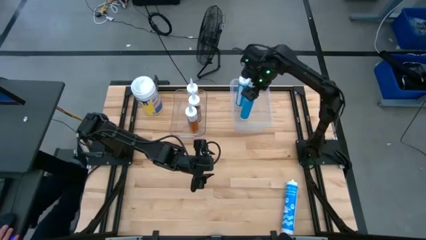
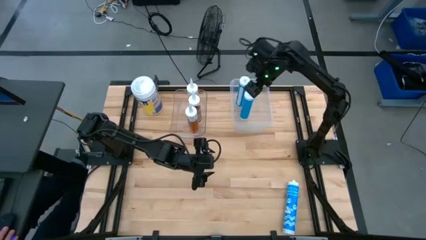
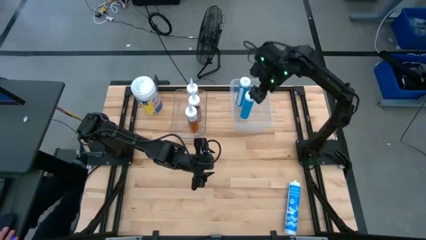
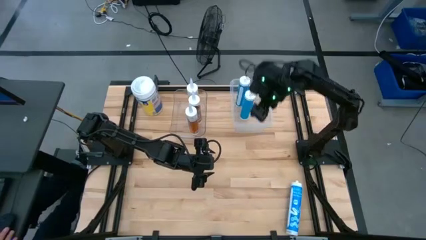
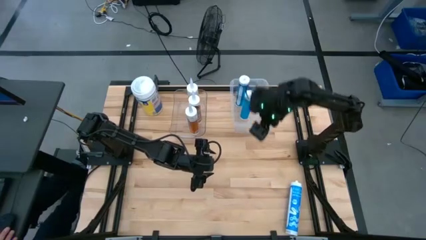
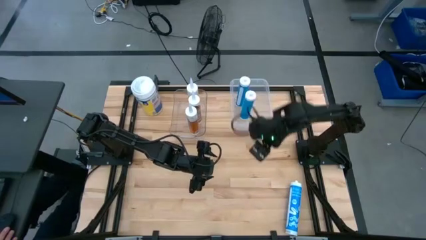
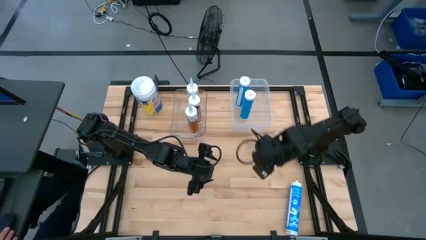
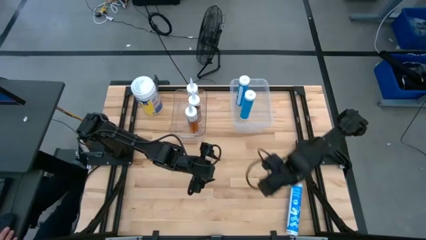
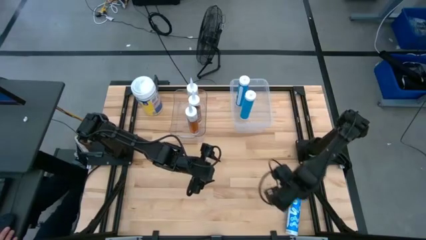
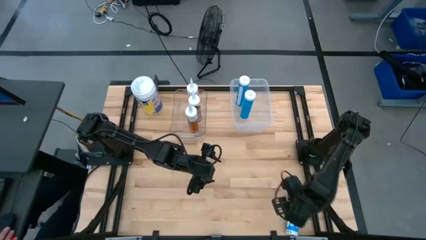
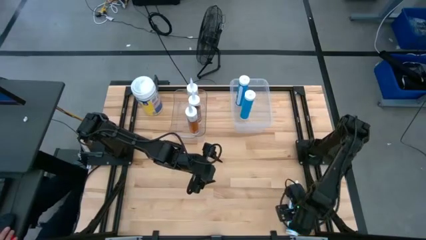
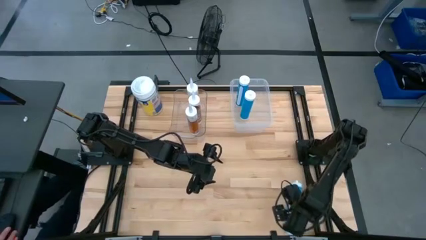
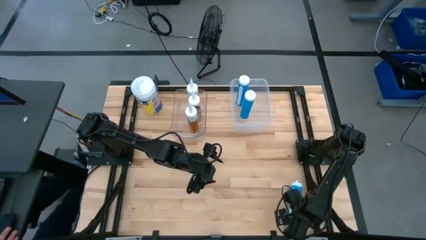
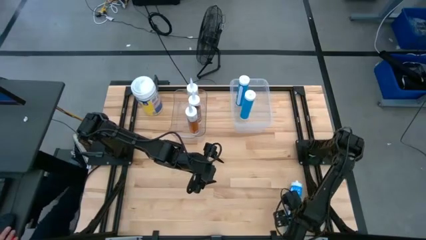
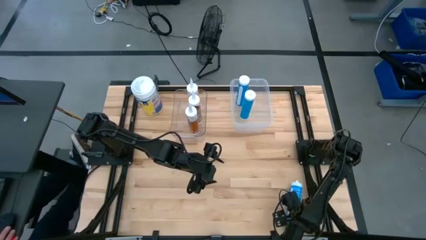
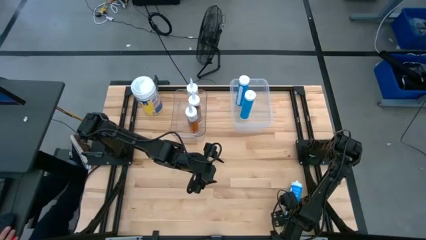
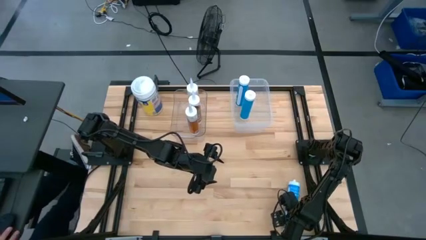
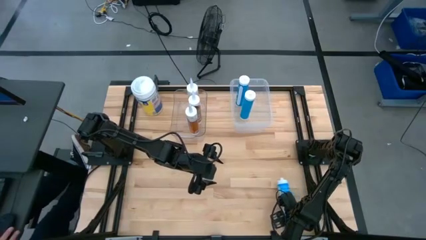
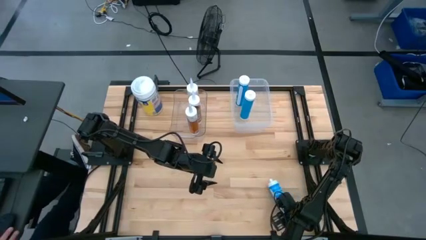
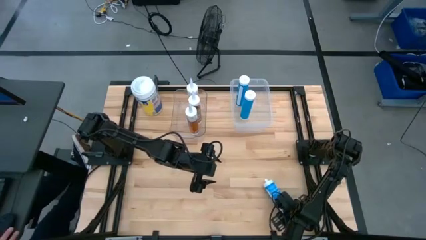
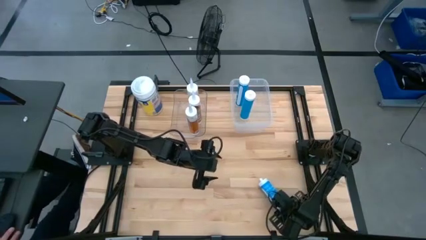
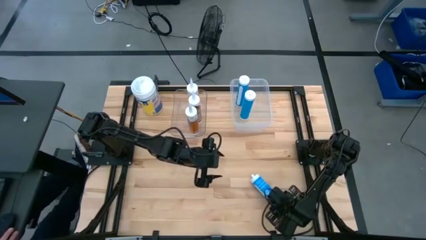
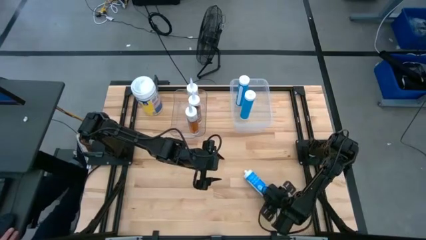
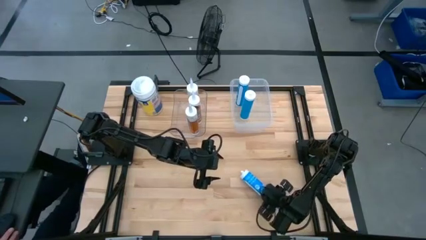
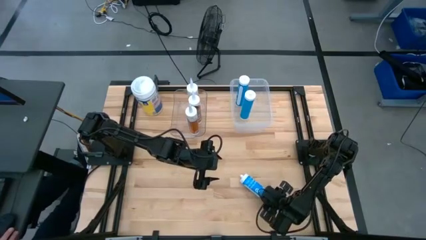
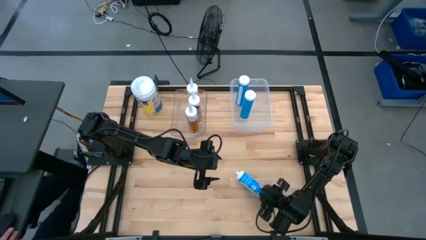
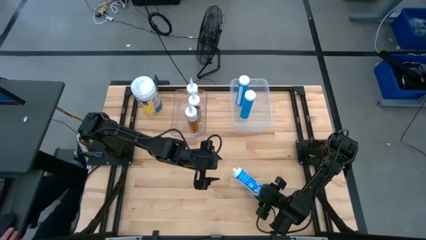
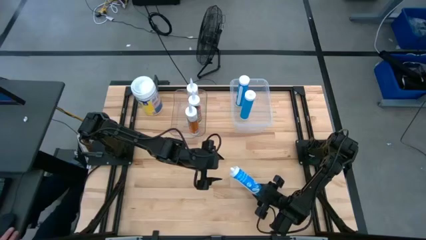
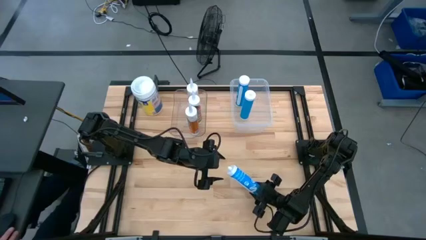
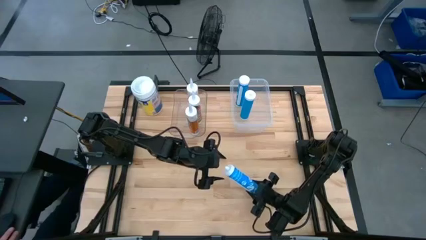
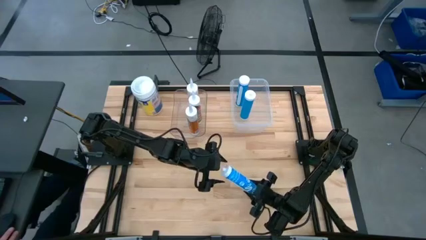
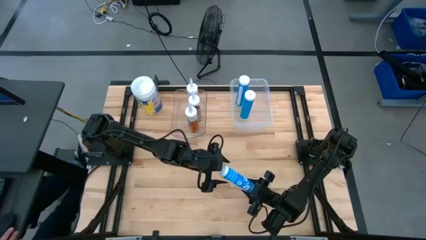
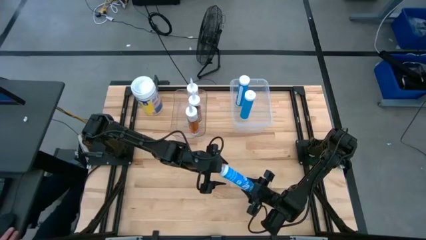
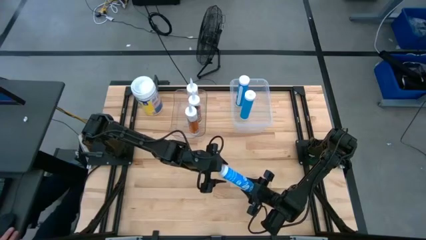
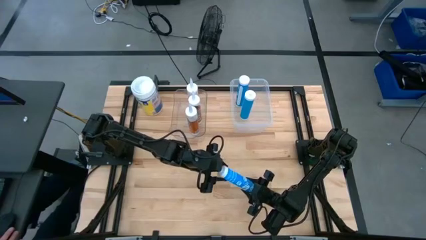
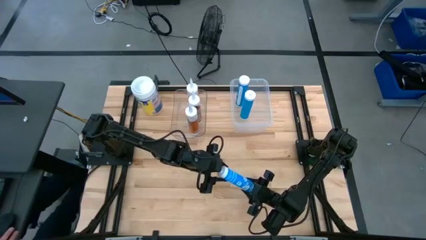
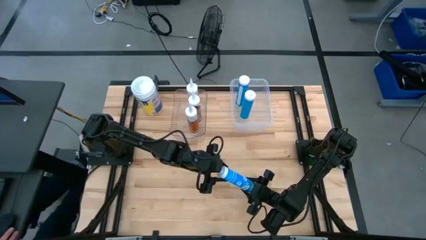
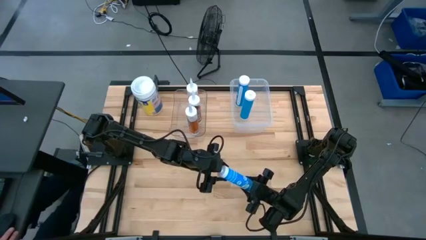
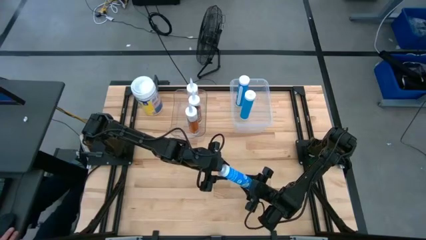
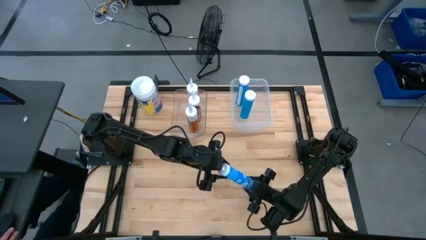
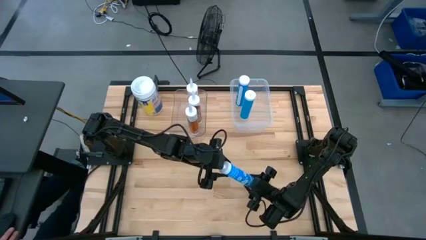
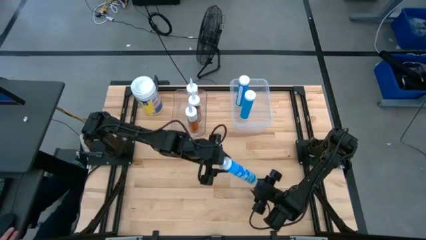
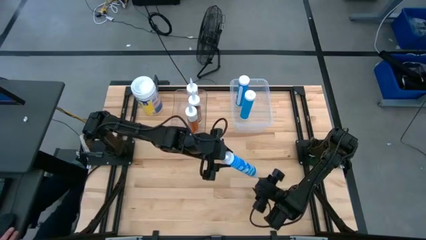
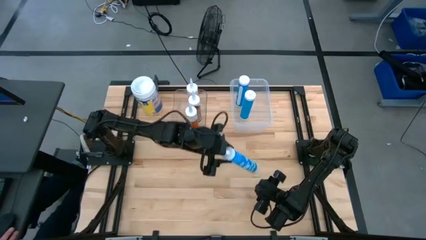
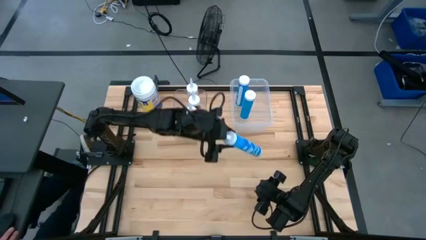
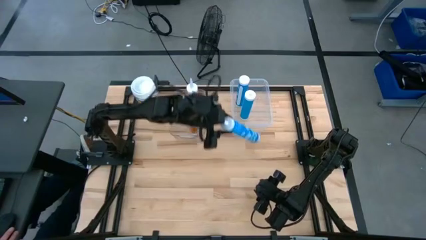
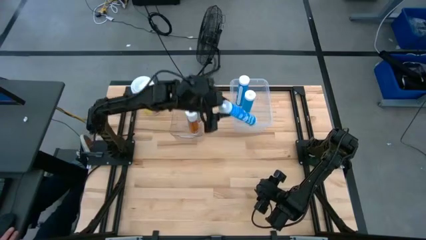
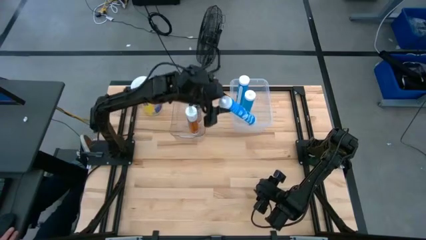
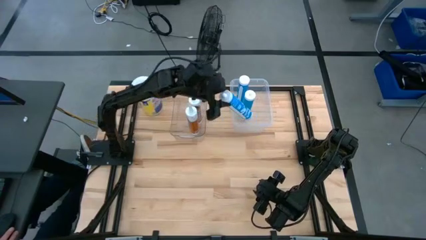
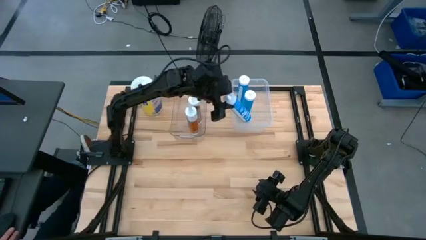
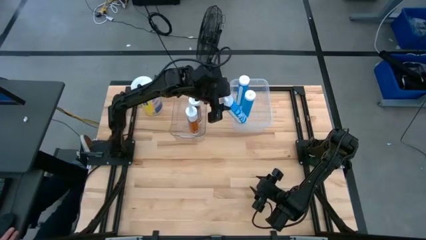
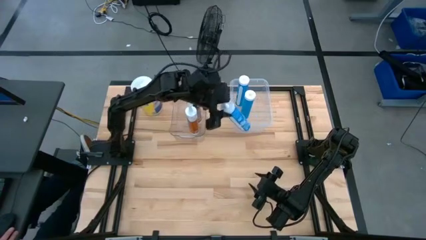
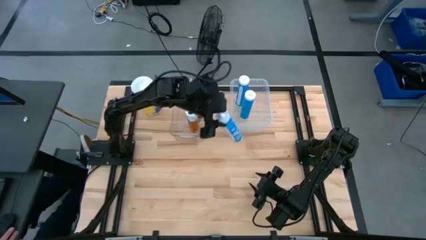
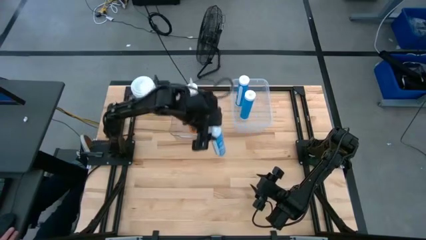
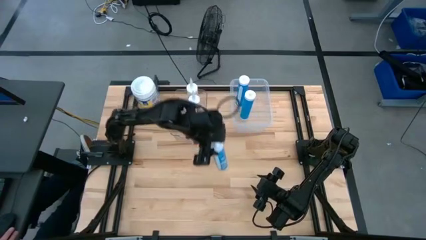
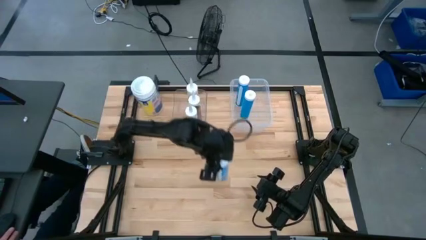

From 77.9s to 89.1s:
Task: Pick & place silicon tubes, Sealant and Lysol wipes
Put the blue sealant into the right transparent bin

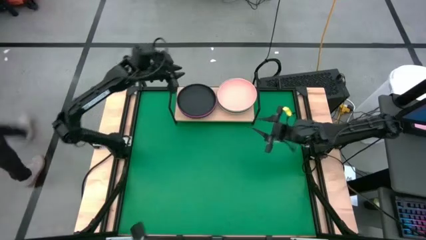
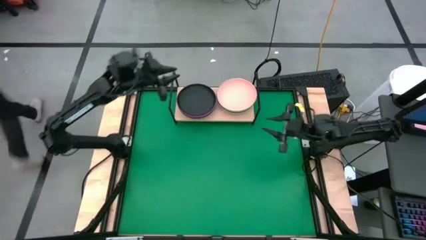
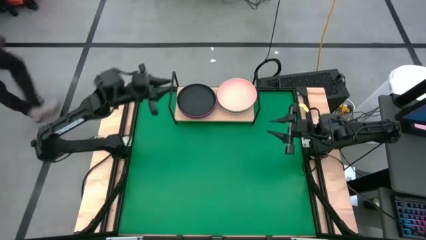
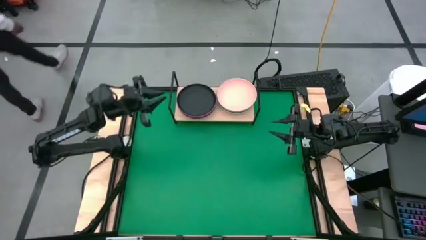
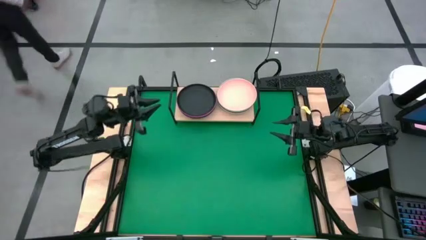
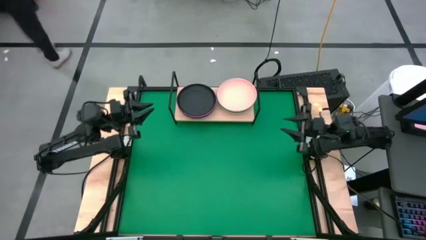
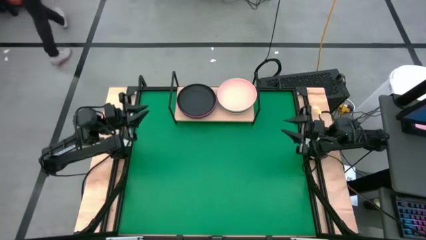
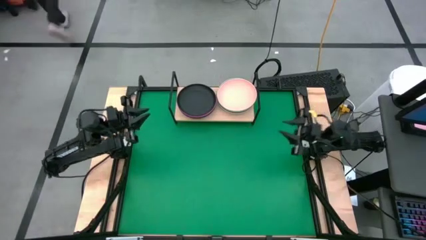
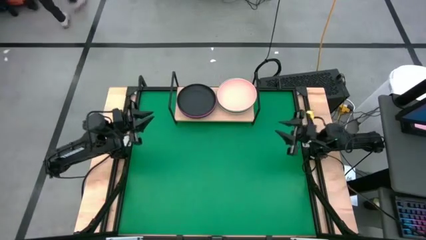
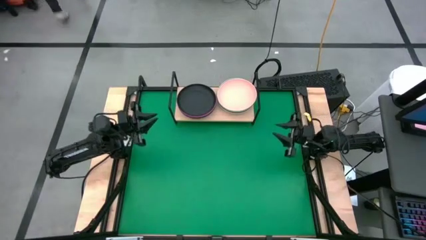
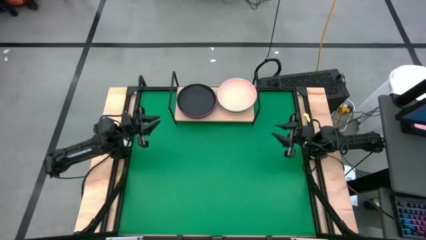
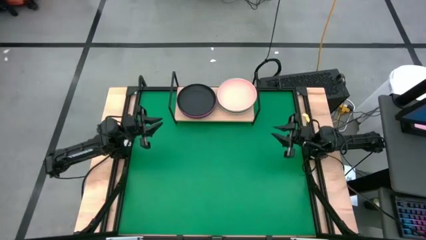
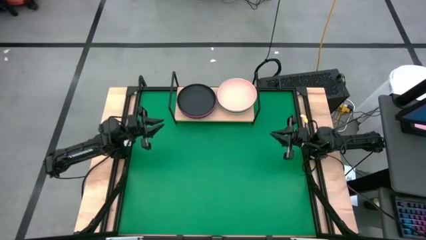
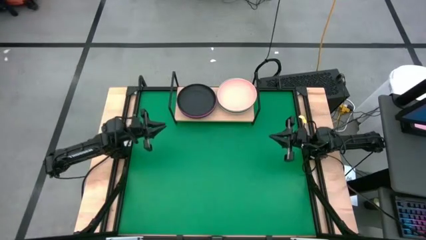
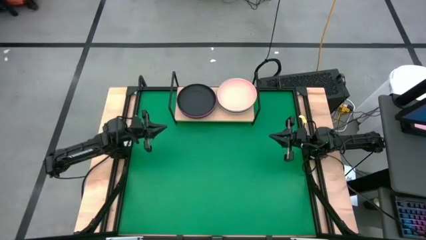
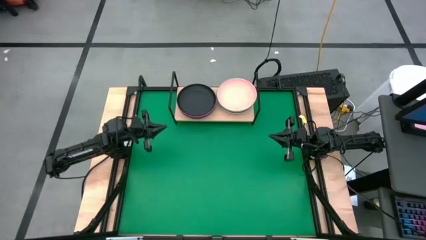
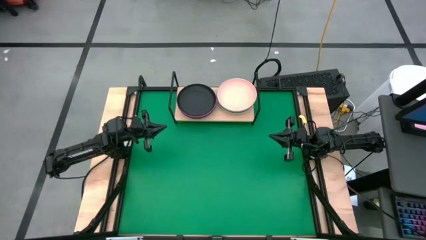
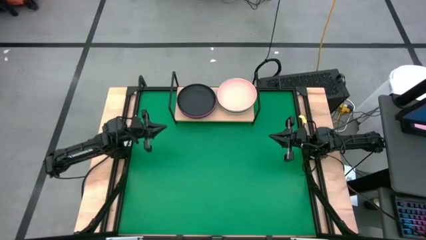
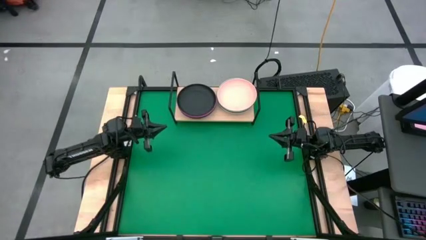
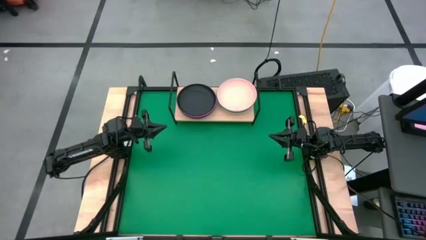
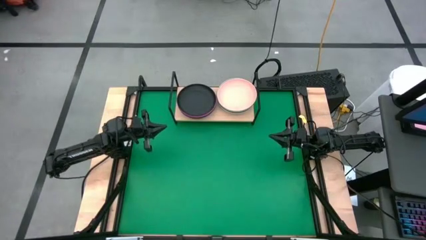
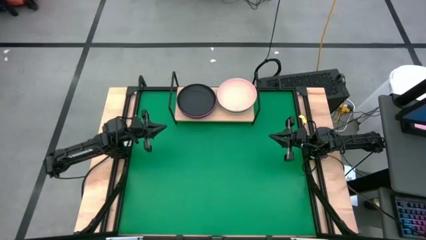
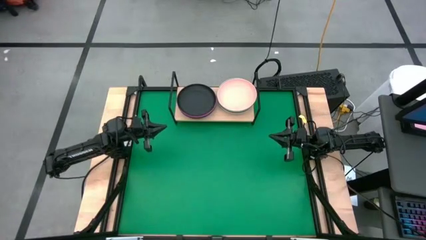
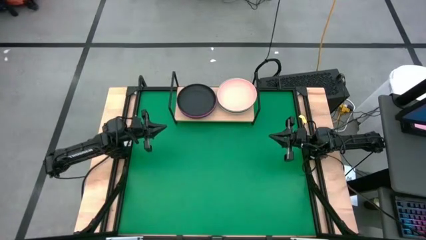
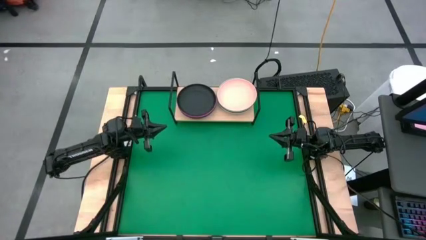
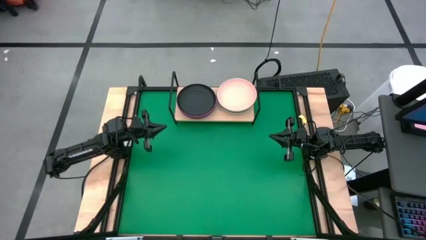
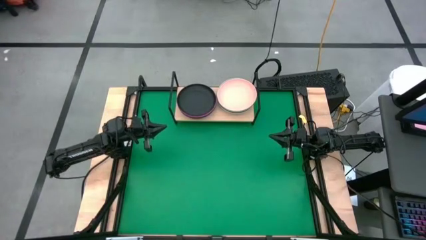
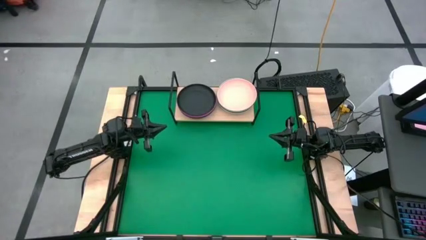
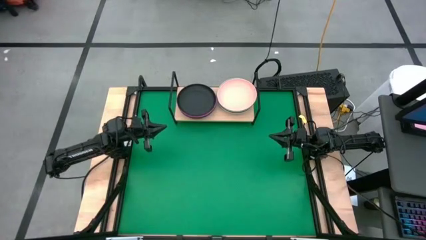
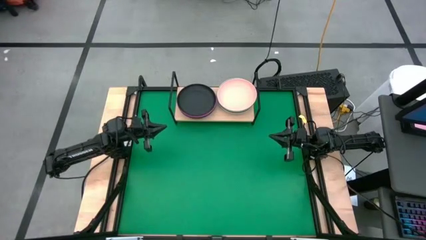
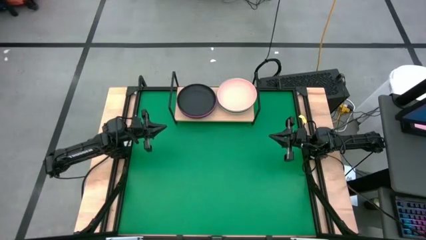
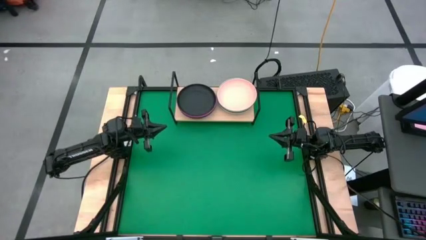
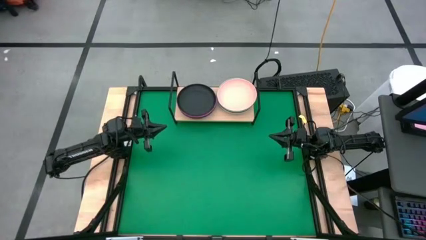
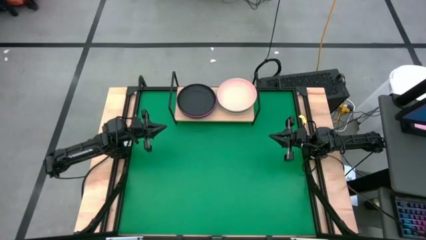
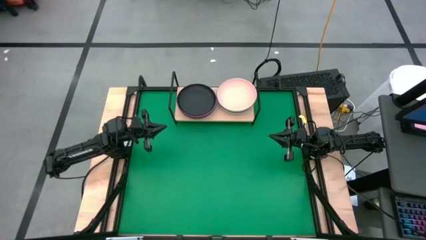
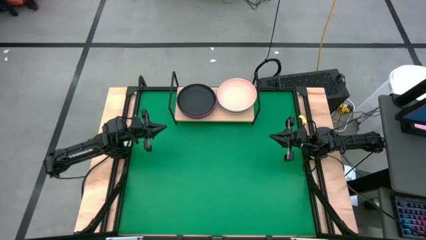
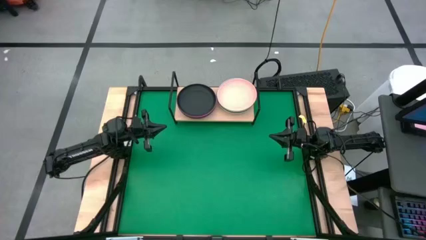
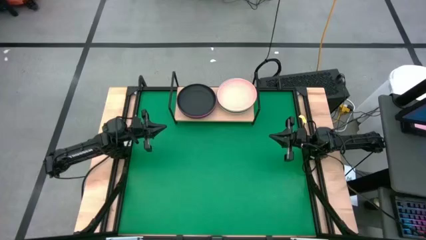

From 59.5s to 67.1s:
Task: Place and stack plates onto a shelf
Return to Home Position
